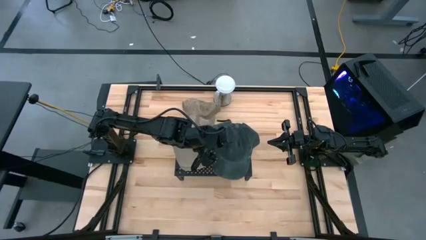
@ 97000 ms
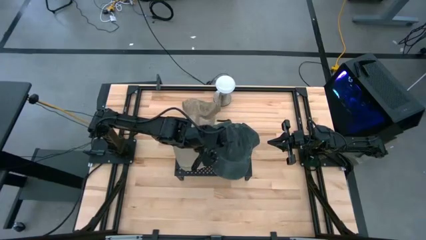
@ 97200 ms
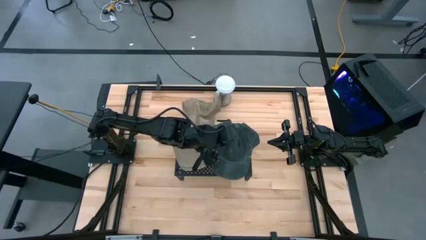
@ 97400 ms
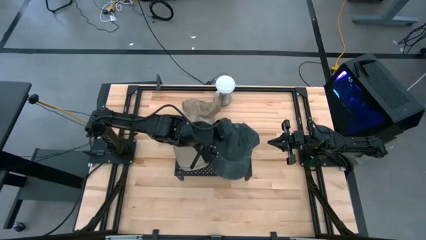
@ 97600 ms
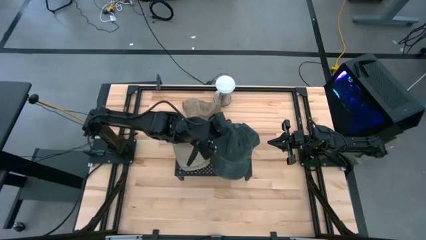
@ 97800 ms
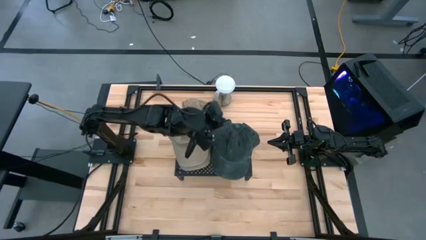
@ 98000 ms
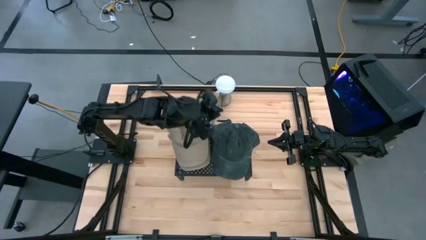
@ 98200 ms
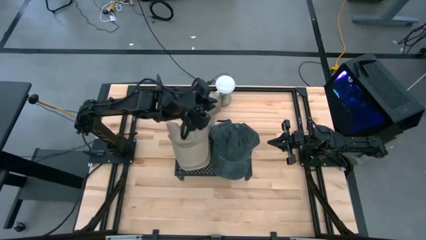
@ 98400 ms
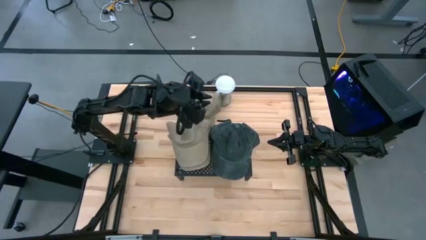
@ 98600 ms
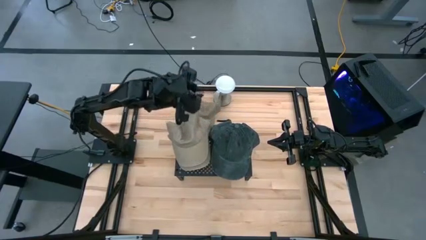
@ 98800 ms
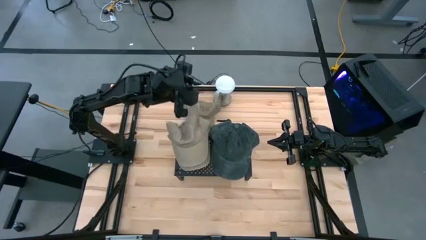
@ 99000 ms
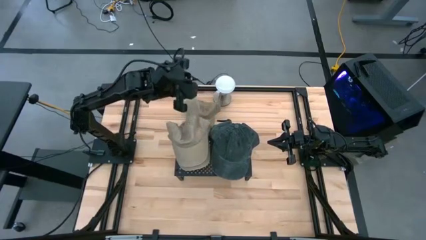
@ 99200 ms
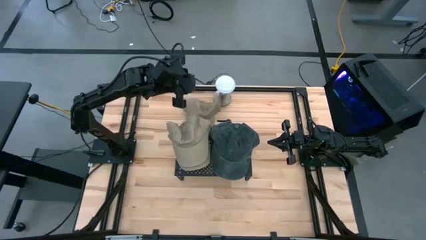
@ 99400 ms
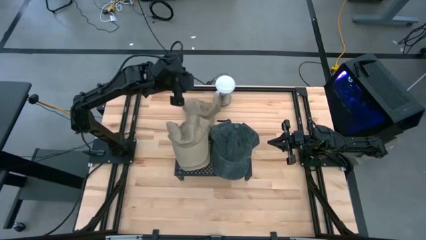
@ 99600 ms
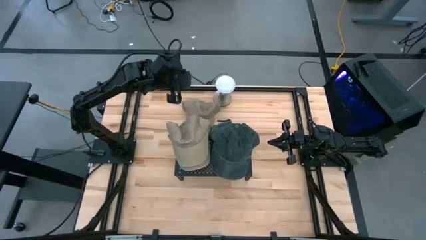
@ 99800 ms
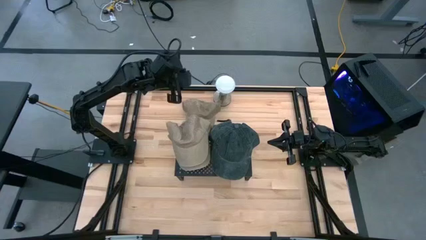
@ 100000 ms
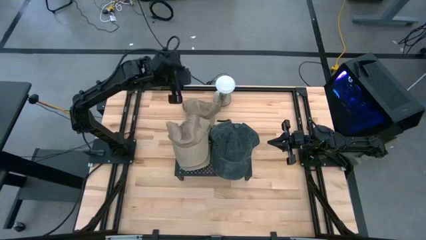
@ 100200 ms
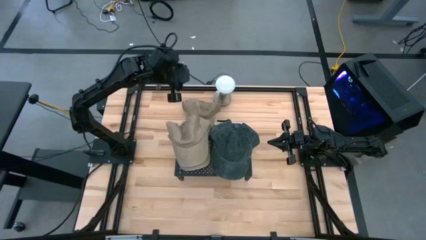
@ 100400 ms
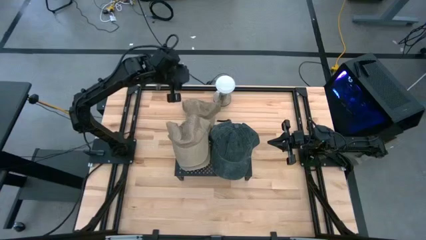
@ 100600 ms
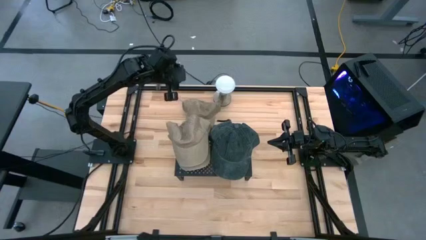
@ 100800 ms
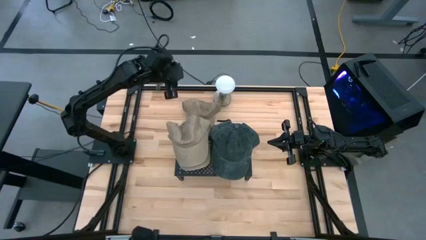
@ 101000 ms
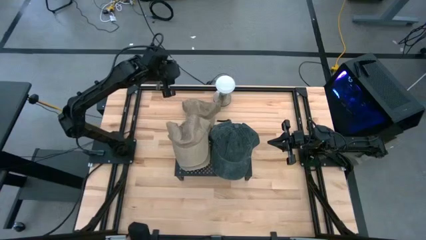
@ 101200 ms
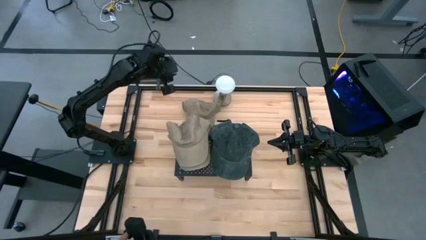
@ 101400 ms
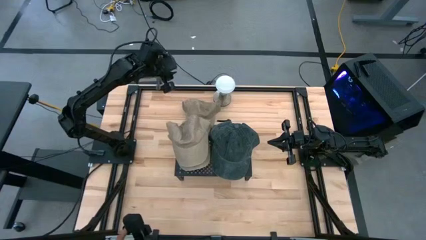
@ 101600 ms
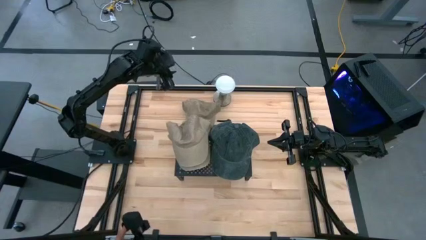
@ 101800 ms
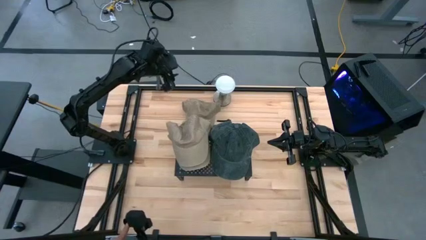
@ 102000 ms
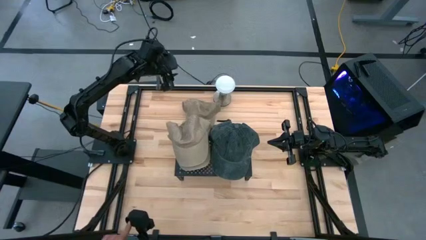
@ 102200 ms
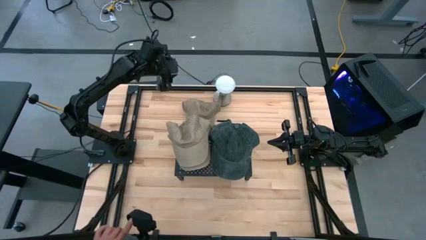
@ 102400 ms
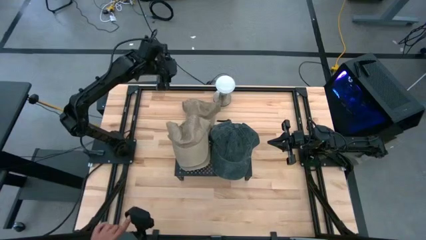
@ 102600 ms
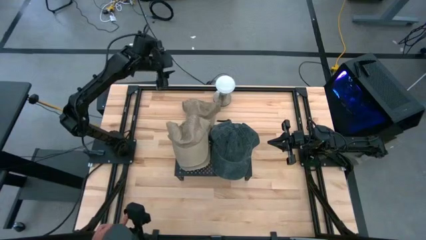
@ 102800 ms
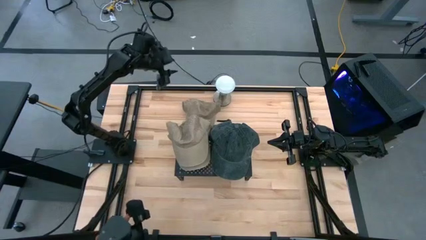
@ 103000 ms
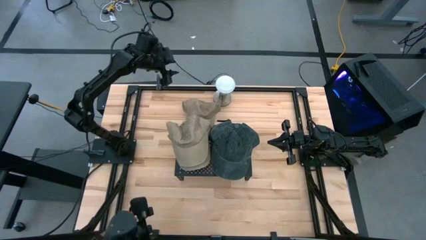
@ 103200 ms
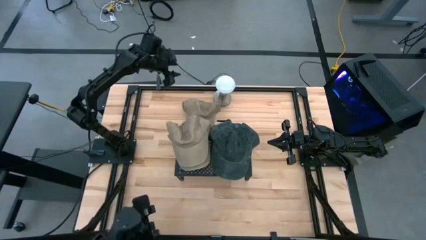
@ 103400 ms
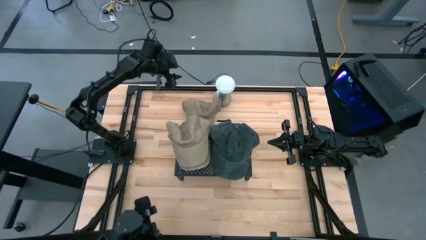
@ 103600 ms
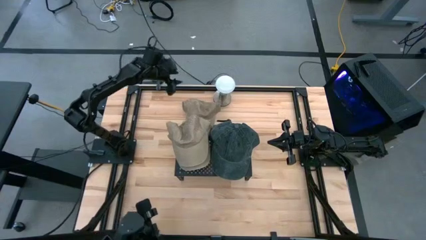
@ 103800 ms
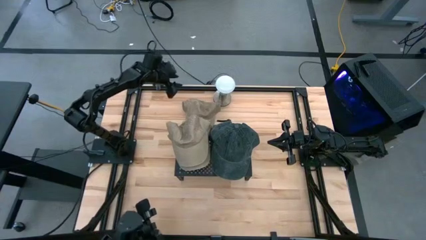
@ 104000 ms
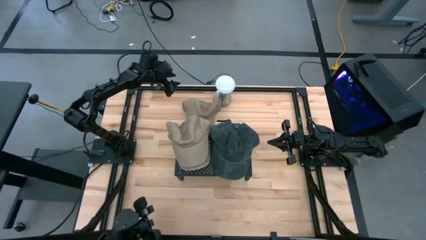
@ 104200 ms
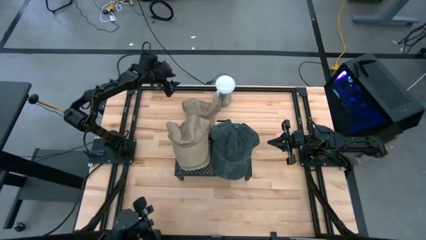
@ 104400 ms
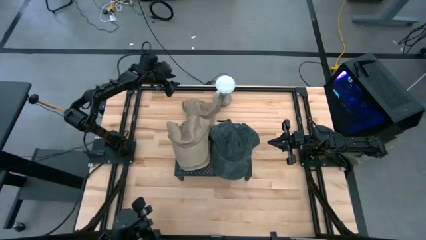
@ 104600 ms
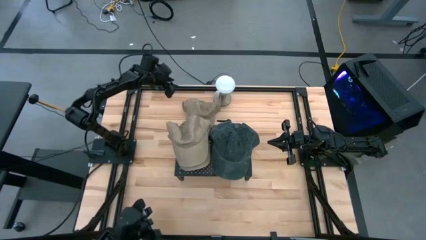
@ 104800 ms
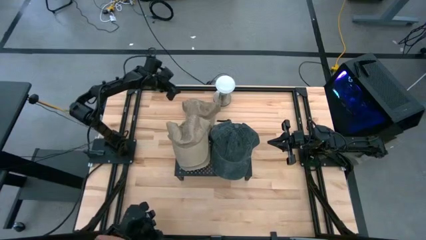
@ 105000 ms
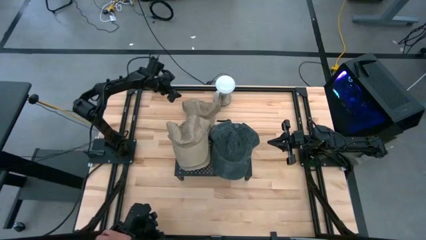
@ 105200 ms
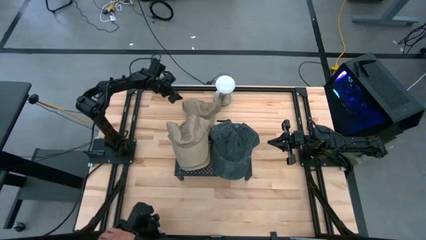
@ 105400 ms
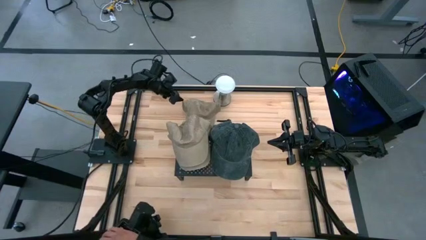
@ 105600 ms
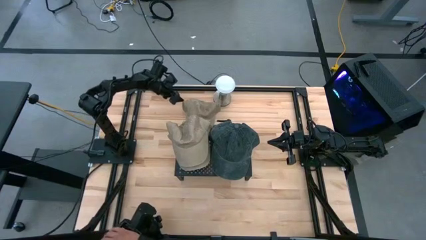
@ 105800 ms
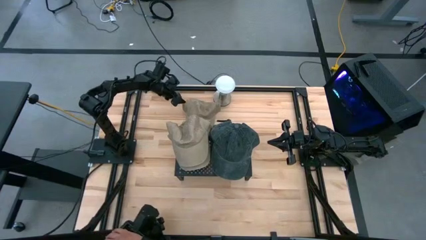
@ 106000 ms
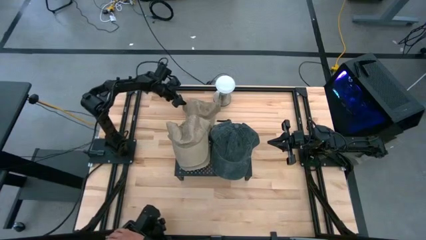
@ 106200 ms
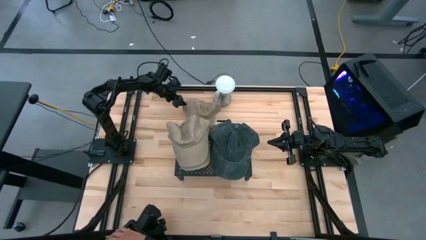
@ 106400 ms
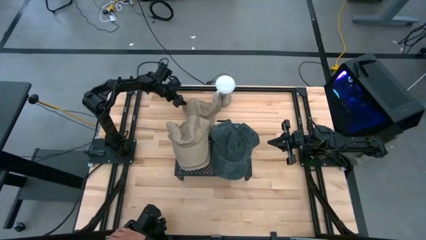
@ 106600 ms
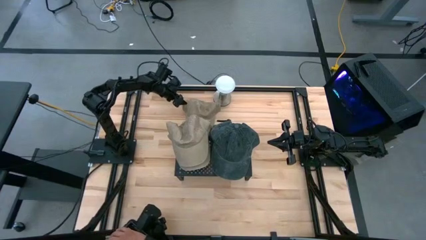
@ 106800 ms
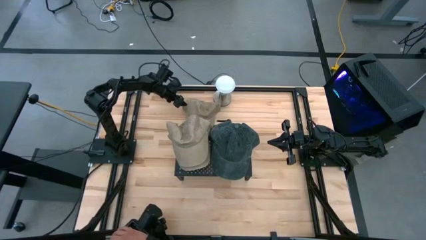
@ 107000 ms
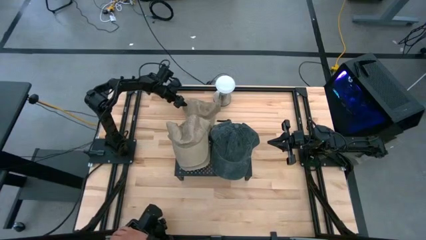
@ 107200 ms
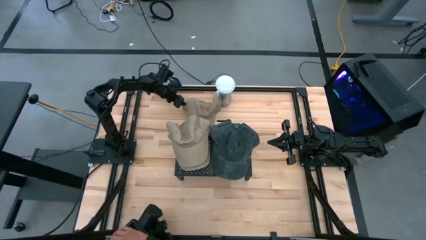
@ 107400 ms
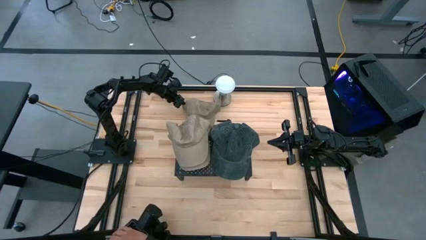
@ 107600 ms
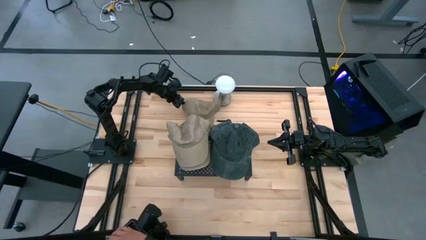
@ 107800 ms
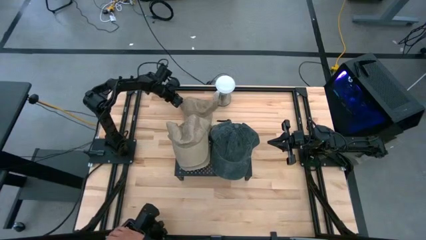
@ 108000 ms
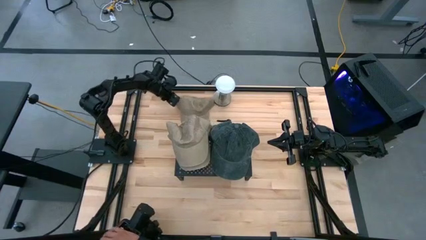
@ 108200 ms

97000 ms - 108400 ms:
Task: Pick & Place hat
Stack the brown cap into the stack of brown caps on the shelf

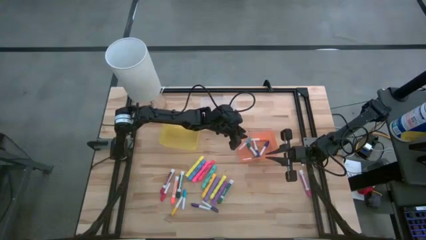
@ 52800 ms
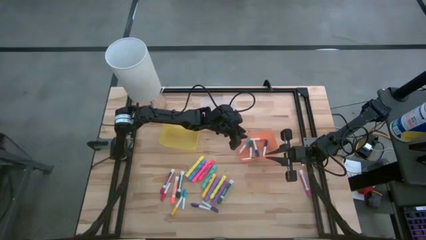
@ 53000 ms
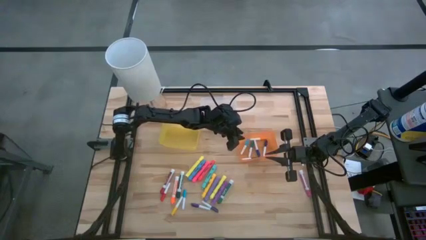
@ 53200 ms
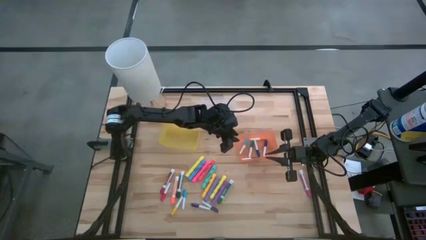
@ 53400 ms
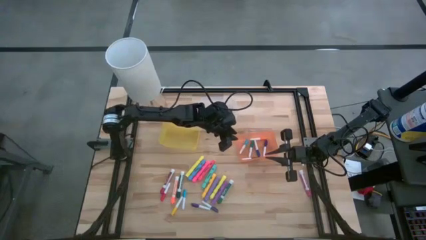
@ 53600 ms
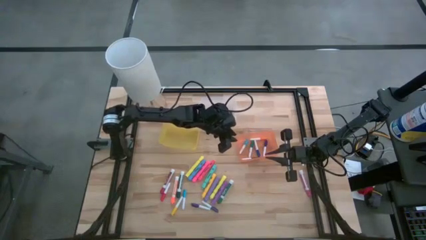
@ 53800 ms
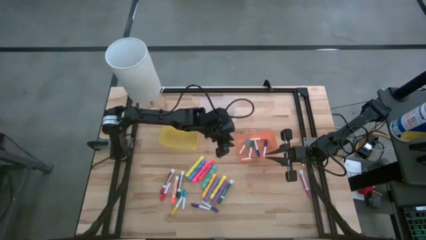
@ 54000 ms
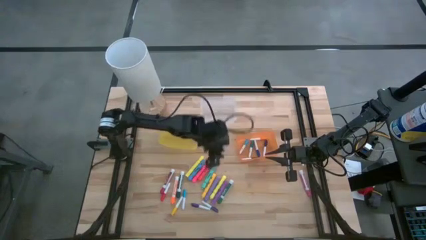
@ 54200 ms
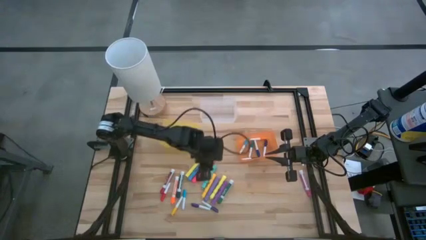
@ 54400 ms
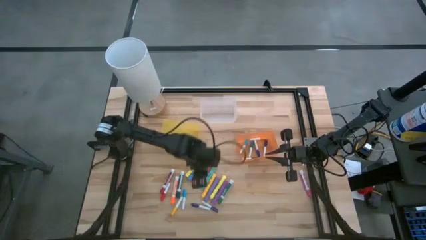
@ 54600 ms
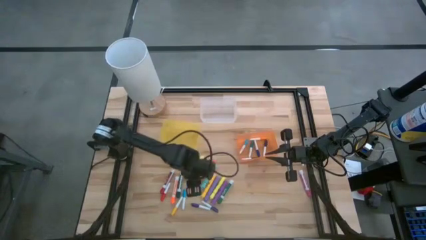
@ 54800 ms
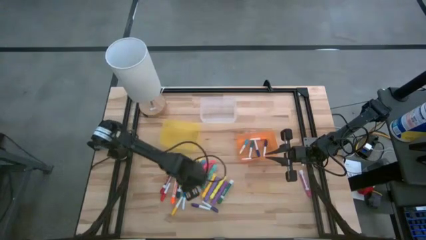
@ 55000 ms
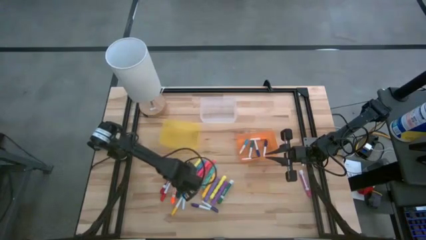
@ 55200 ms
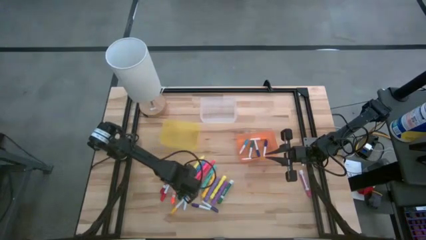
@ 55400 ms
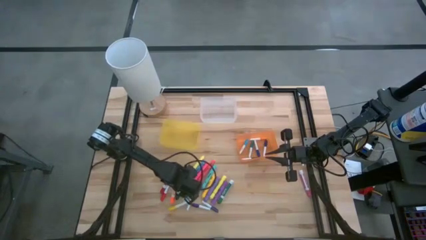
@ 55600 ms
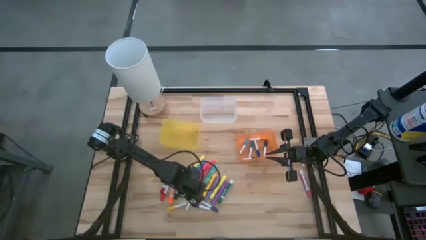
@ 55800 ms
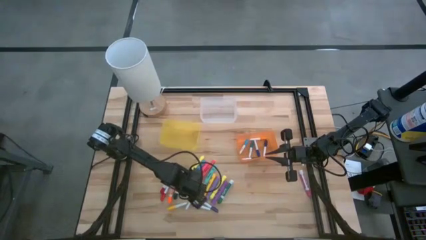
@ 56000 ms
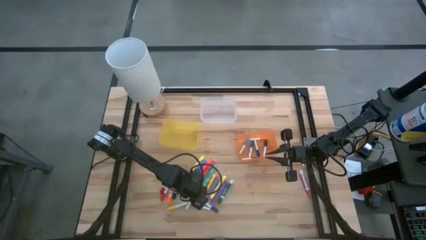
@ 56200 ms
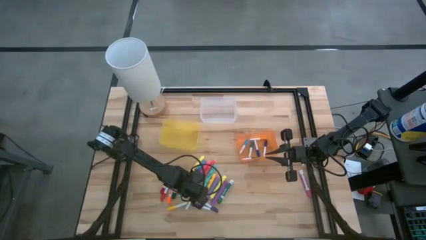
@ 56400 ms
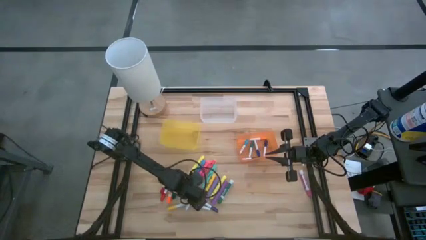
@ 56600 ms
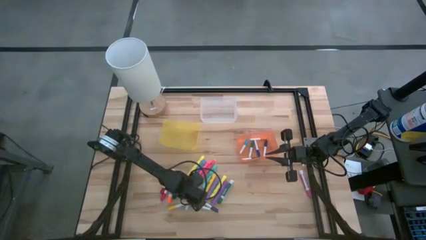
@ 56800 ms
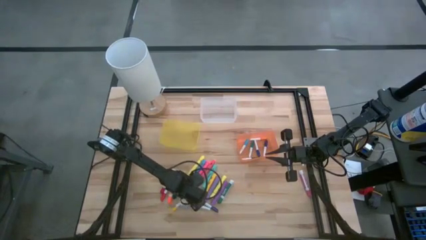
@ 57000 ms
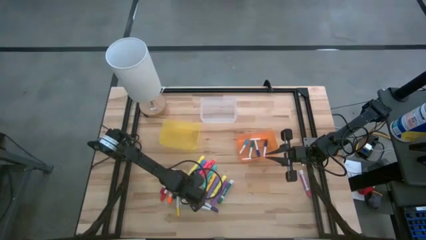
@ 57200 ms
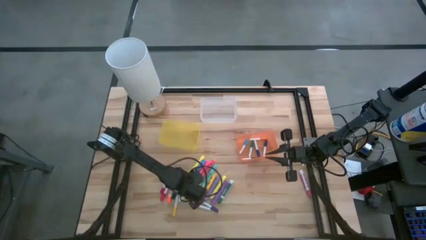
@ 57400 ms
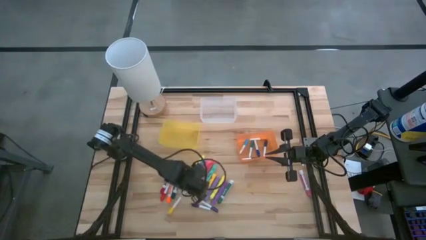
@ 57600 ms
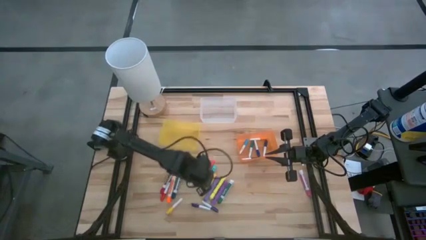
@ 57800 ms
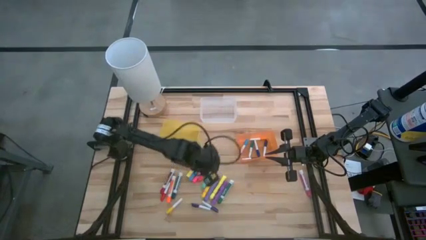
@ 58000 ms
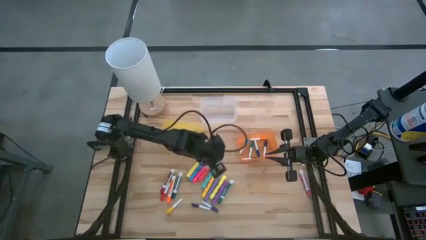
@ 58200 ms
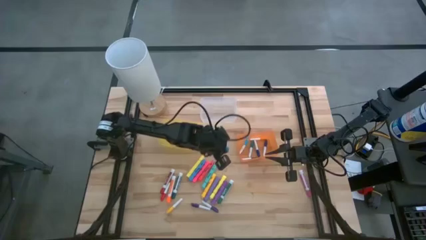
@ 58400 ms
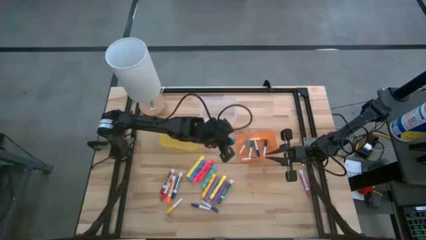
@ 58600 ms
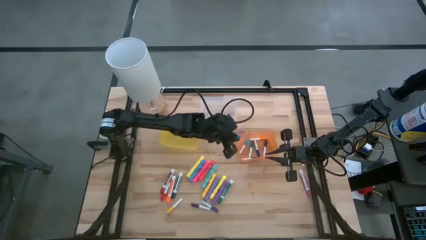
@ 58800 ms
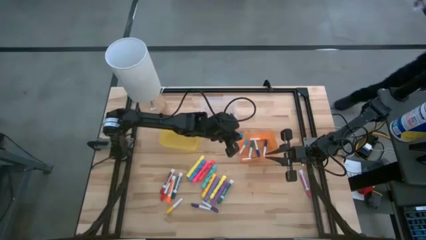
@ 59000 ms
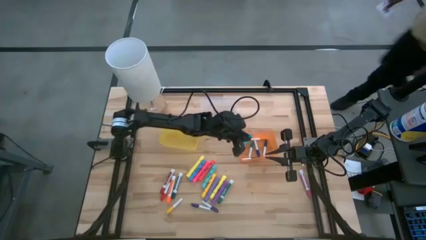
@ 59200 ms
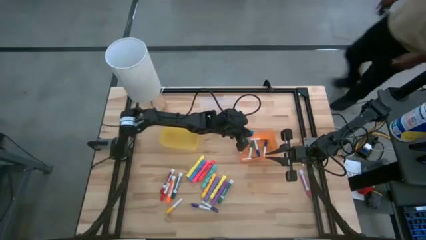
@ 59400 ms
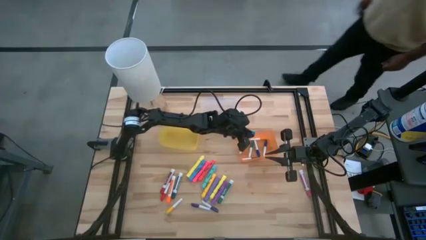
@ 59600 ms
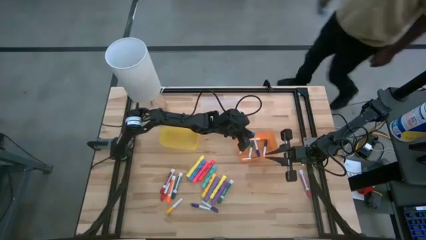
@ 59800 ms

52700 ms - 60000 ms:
Task: Pick & Place Markers
Put the small light blue highlighter pen into the orange bin
